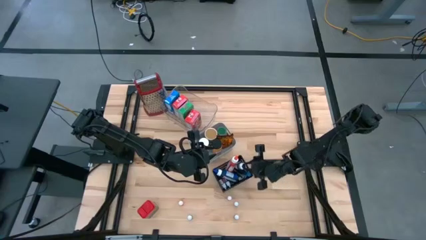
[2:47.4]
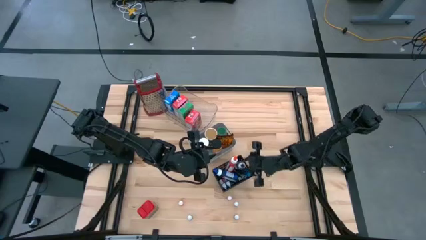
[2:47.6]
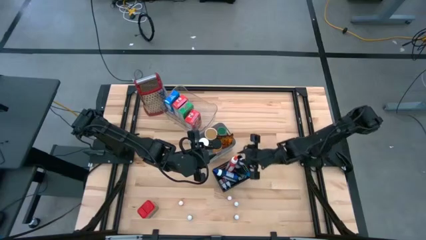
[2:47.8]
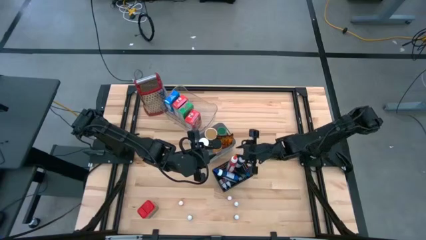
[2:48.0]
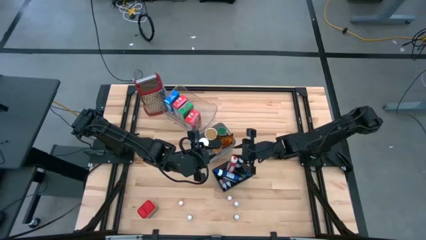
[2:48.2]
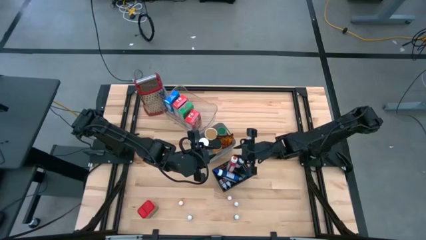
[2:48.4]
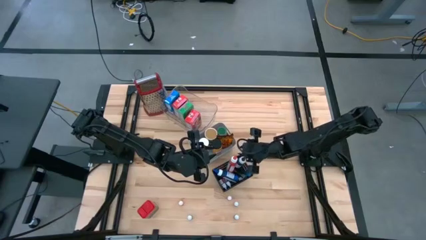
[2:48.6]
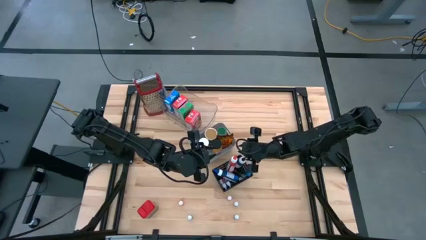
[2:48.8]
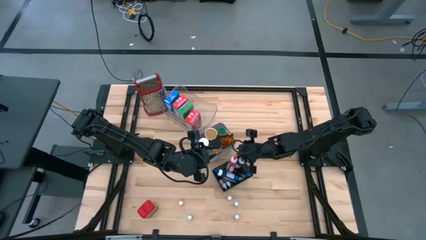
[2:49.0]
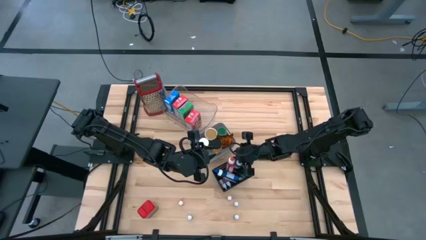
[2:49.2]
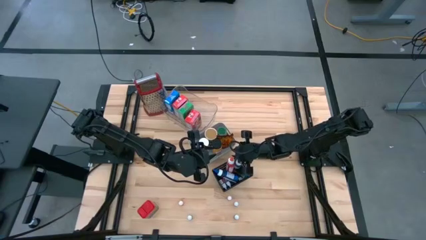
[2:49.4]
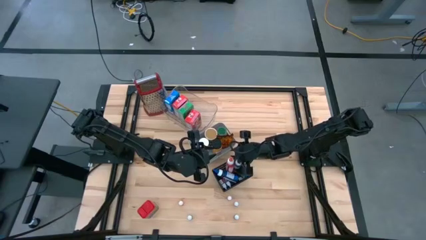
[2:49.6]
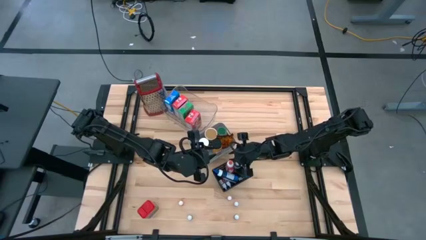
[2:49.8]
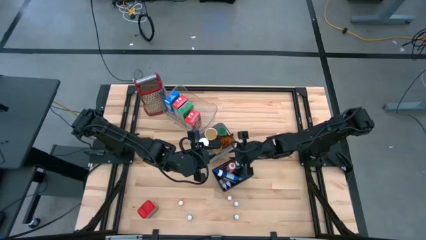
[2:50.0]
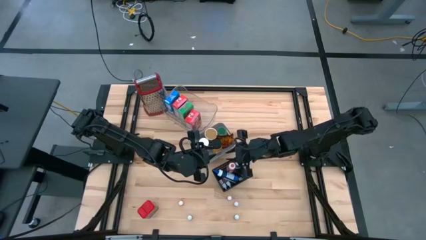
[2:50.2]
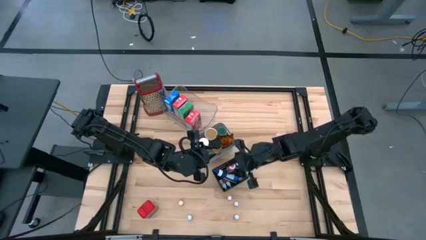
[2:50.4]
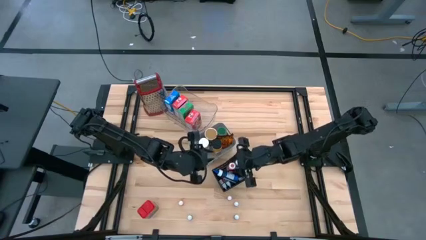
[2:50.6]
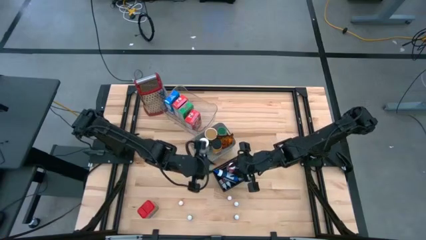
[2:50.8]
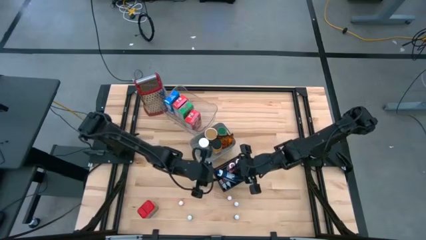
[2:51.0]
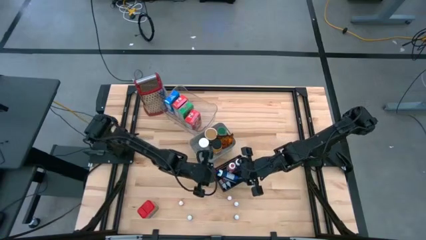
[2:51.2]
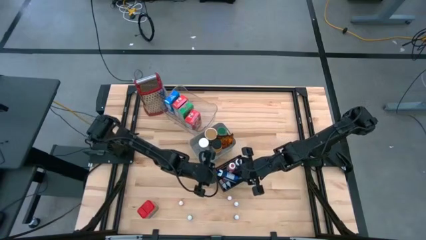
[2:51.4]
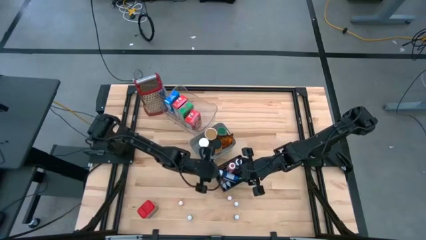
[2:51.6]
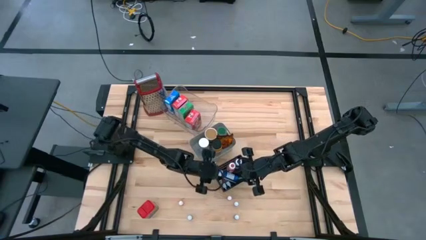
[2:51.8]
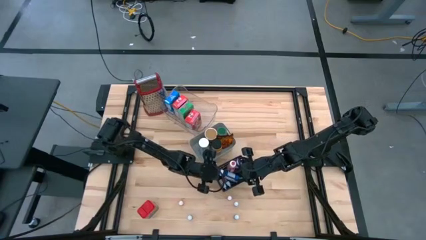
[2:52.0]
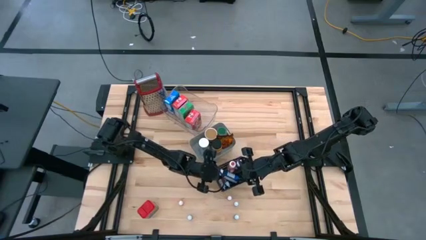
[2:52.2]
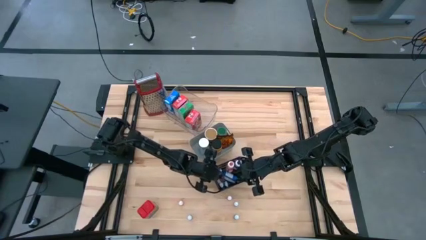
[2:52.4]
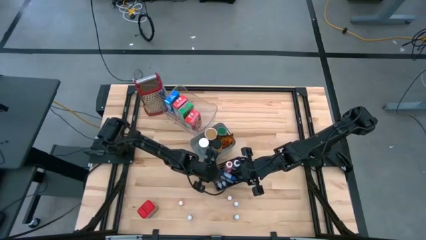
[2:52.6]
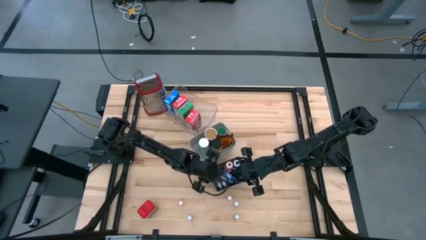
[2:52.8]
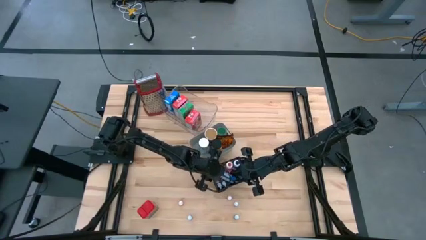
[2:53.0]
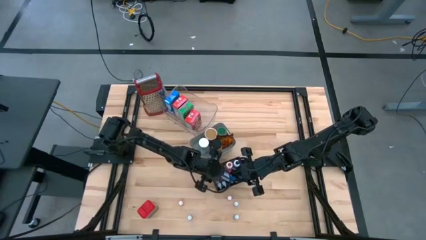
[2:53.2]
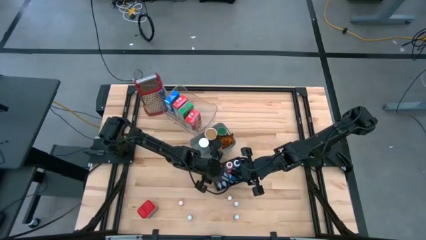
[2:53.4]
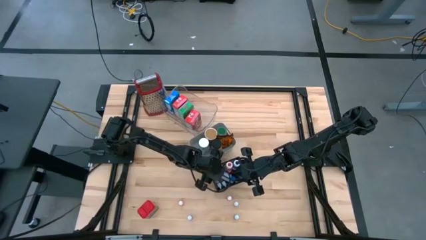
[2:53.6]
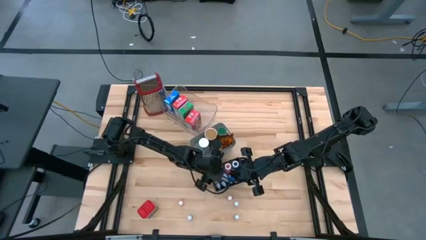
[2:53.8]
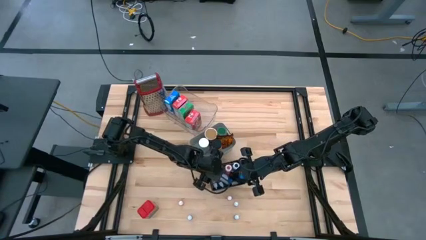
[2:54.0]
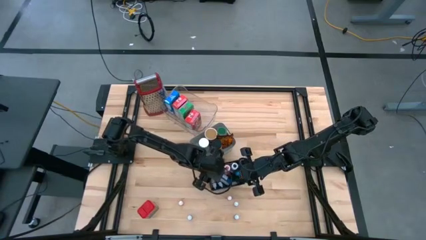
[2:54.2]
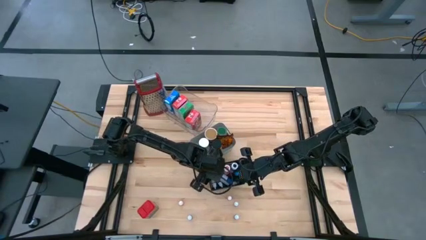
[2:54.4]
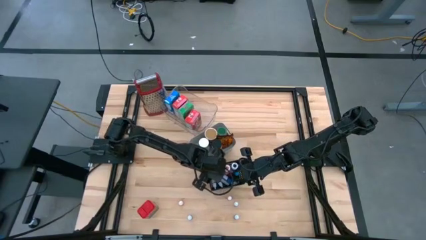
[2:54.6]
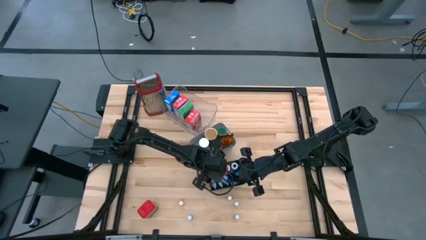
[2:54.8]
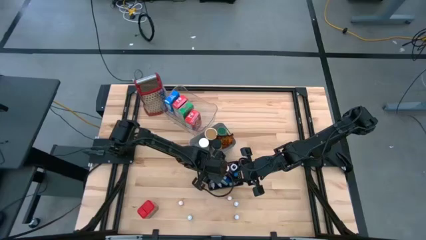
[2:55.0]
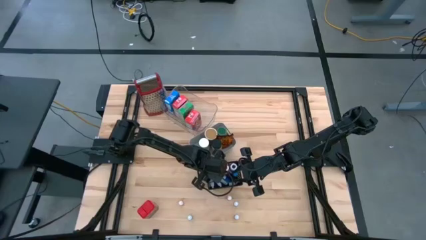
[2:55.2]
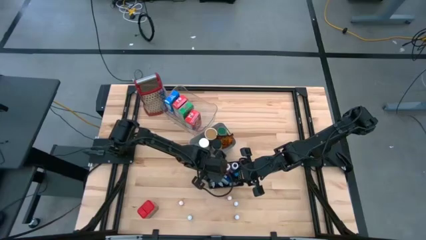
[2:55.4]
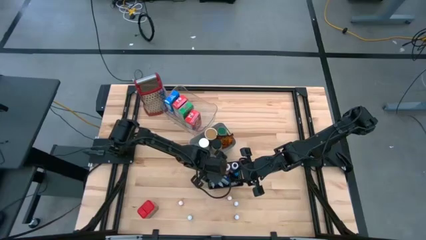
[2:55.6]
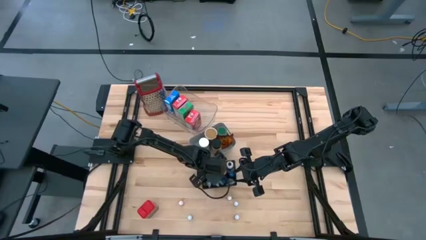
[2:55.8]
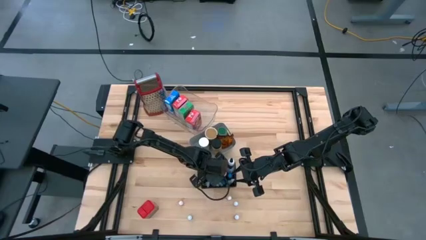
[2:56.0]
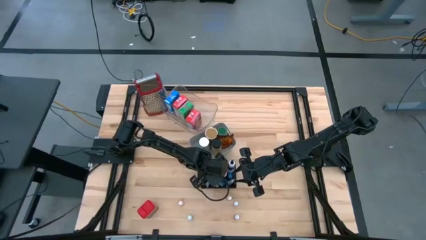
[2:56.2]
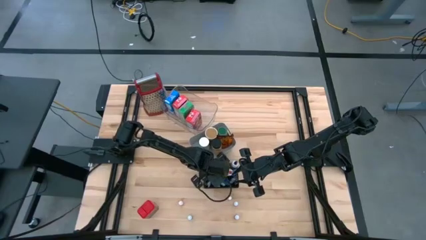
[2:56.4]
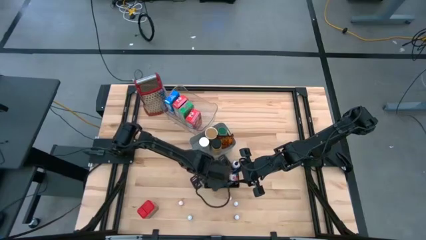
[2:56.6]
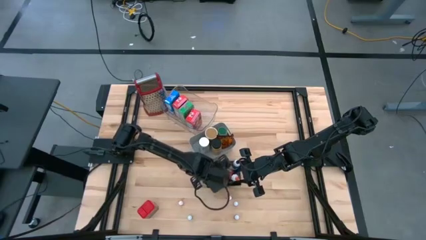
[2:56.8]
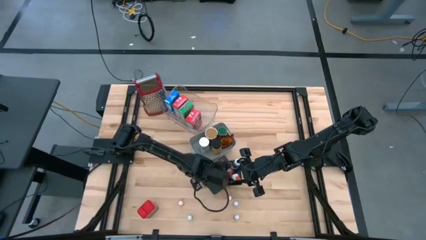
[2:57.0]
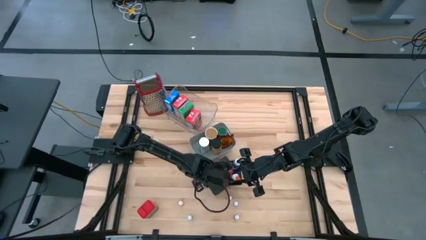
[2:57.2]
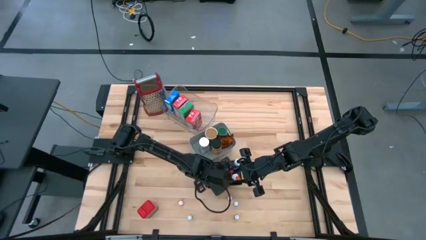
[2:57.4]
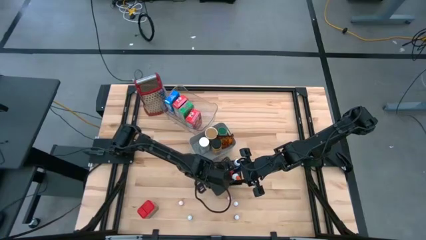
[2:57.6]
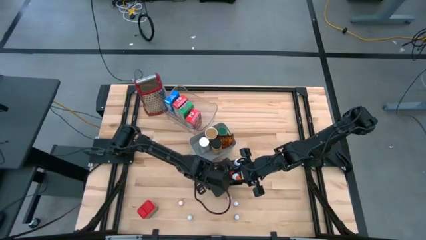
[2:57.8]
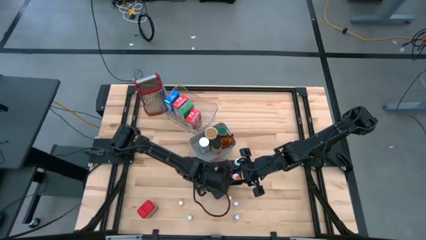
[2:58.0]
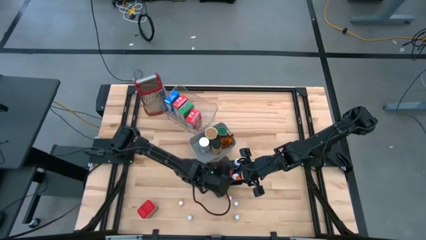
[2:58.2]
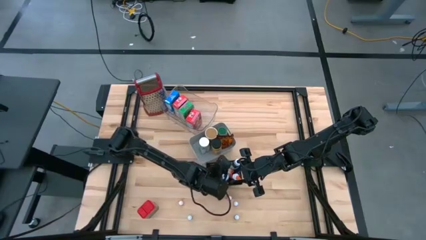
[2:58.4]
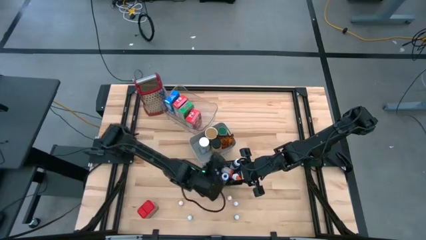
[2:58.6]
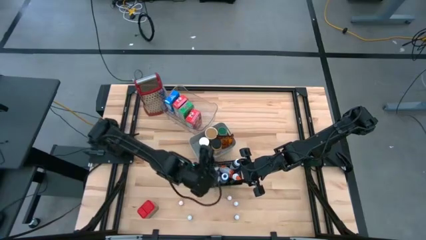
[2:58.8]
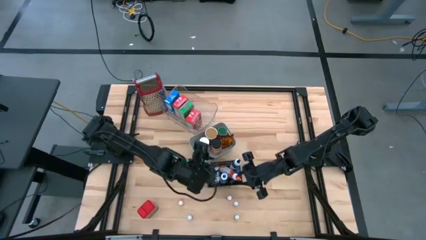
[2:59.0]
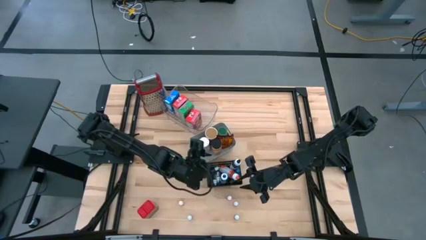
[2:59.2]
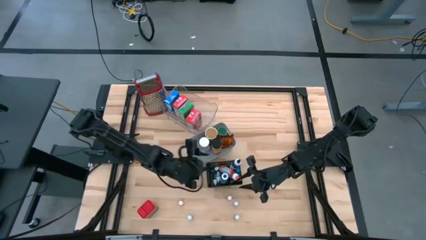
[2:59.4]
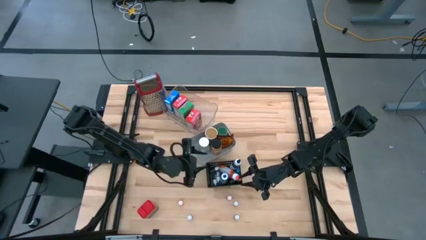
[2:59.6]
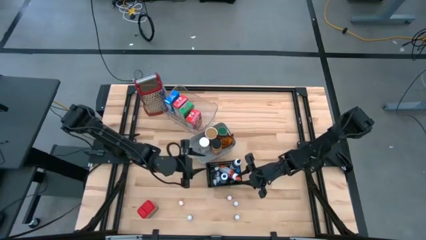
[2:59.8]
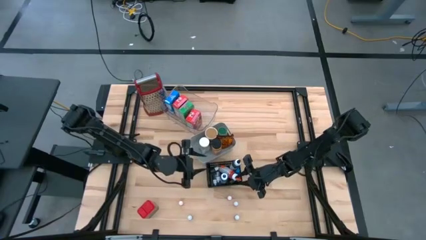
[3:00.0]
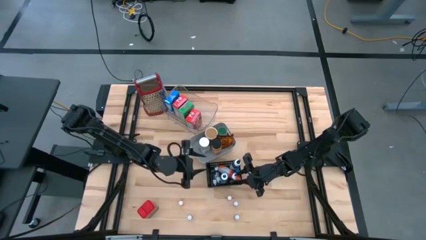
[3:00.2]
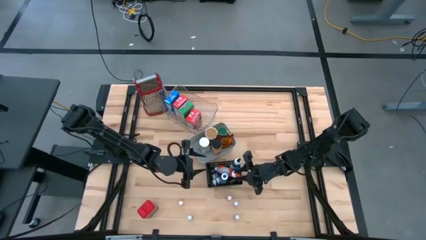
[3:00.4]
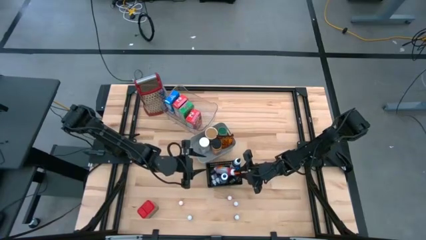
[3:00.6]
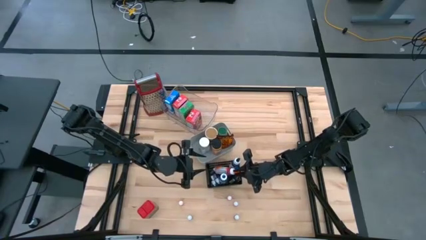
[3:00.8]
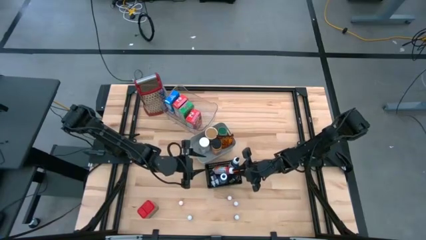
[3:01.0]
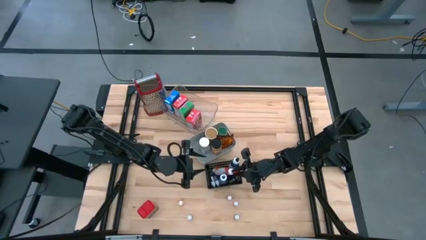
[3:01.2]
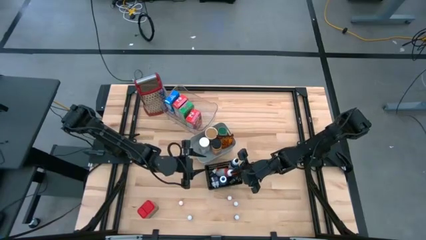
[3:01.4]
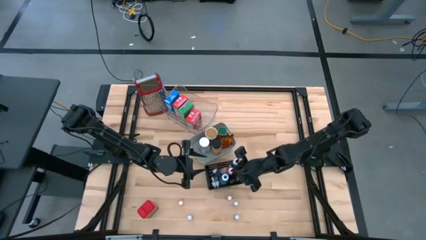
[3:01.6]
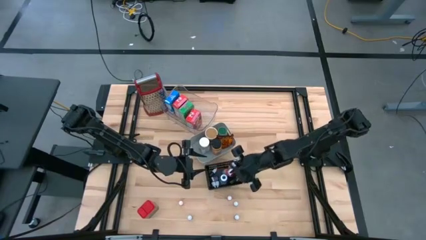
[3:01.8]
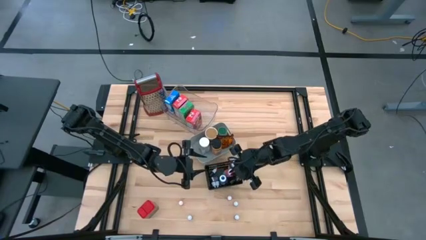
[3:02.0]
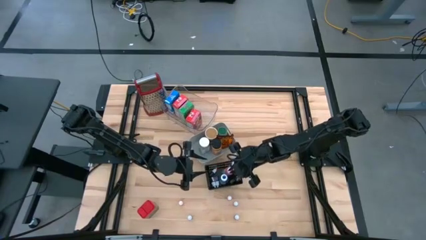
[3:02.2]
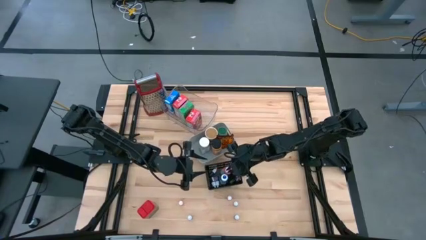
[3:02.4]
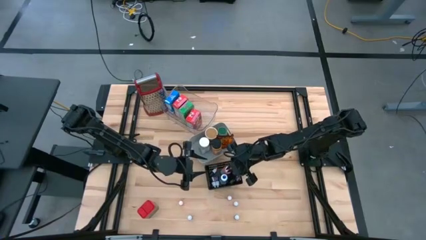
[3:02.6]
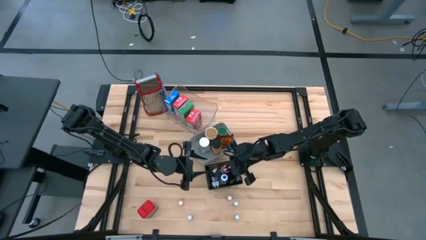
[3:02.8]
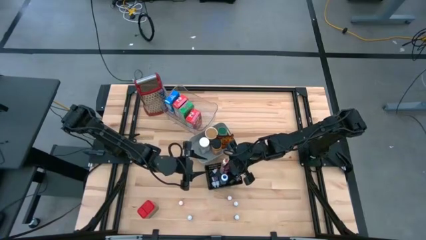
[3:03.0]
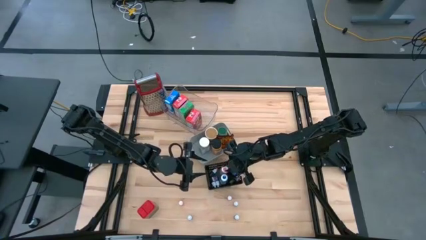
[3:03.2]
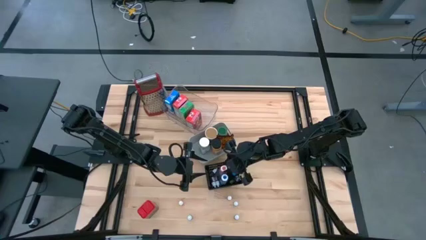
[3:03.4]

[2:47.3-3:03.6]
Task: Pick & Place Kitchen Items
Adjust the food coloring bottles on the black bin

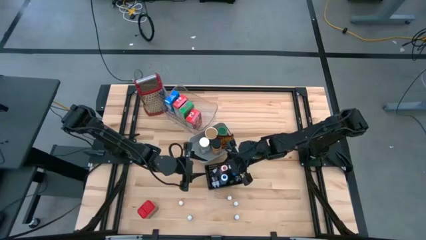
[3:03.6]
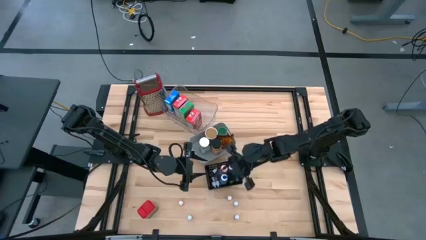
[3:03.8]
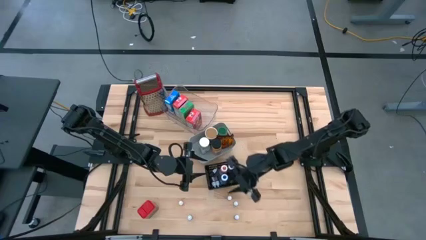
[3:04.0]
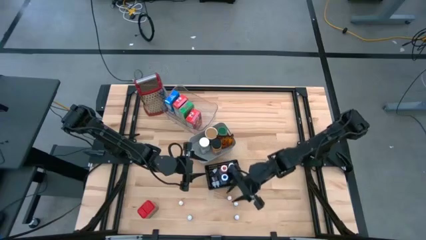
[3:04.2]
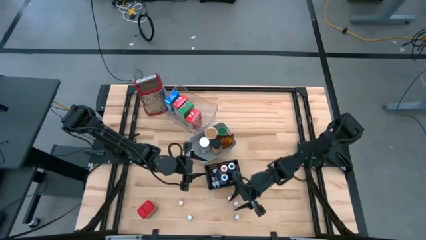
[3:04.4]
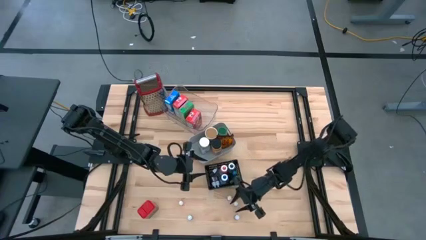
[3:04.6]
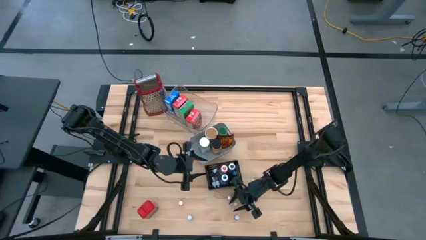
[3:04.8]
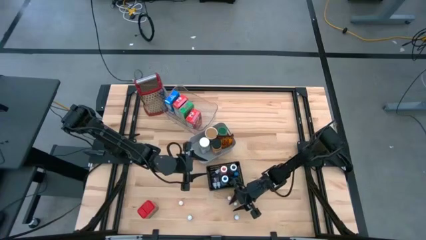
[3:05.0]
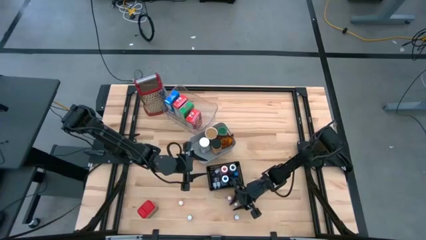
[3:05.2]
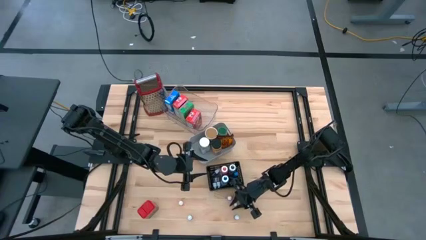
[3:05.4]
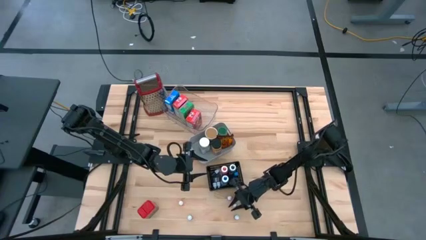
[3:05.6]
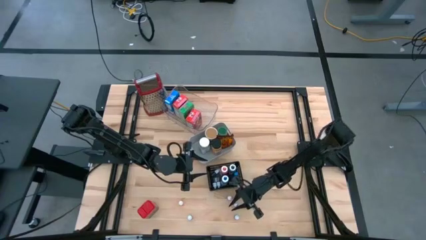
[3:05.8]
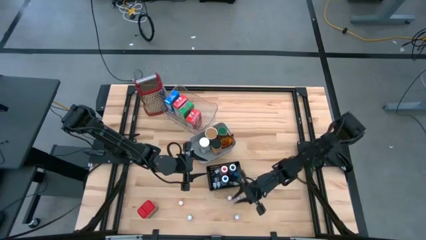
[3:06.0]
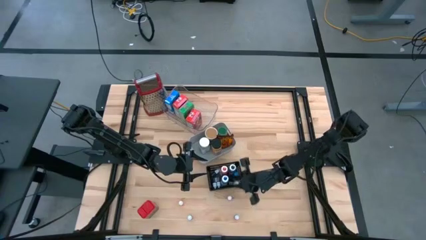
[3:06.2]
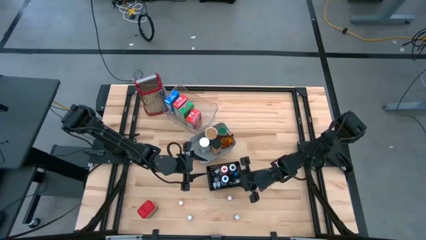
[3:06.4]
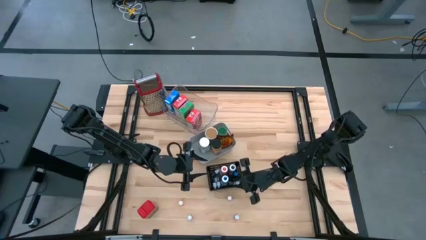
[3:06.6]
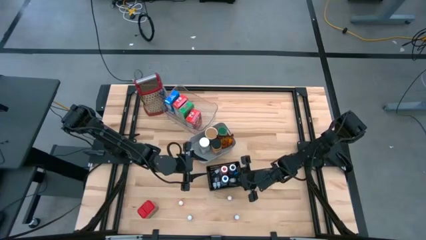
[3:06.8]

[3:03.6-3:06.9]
Put the purple small food coloring bottle into the black bin
